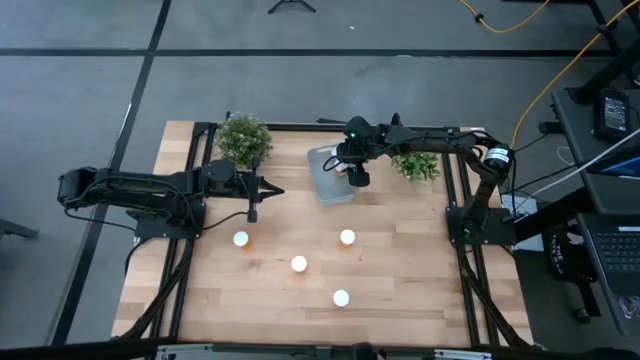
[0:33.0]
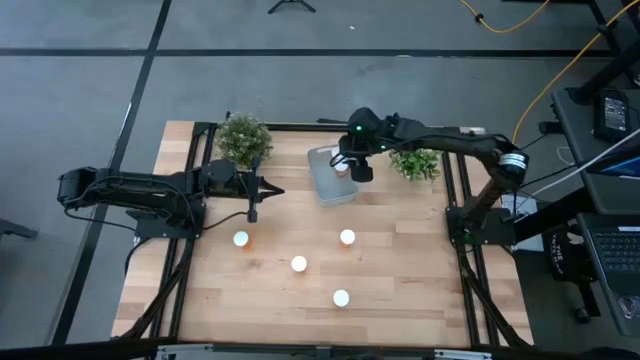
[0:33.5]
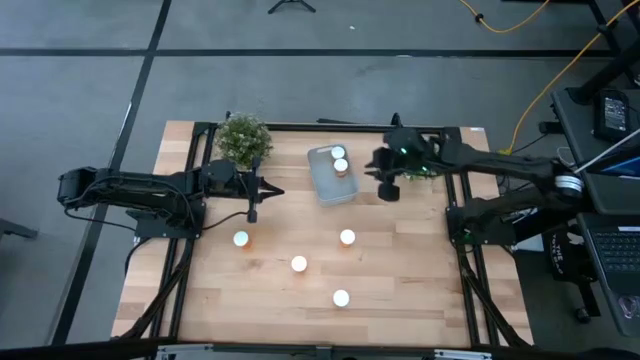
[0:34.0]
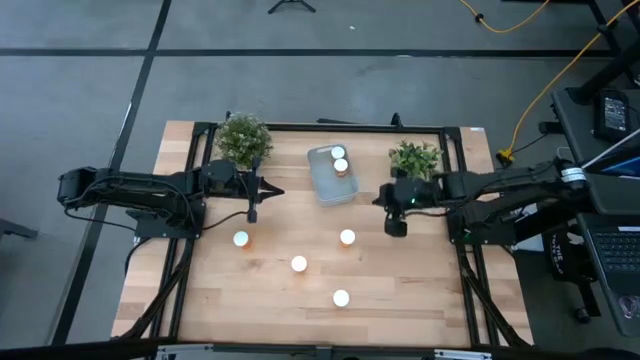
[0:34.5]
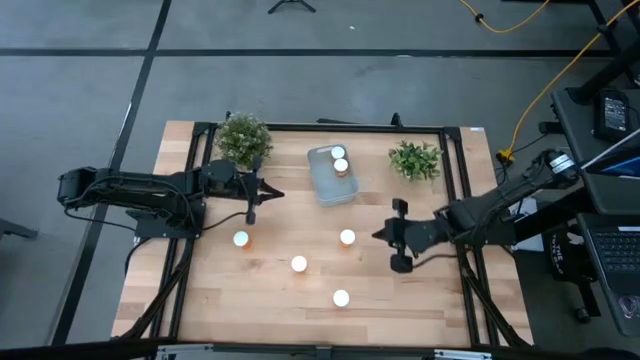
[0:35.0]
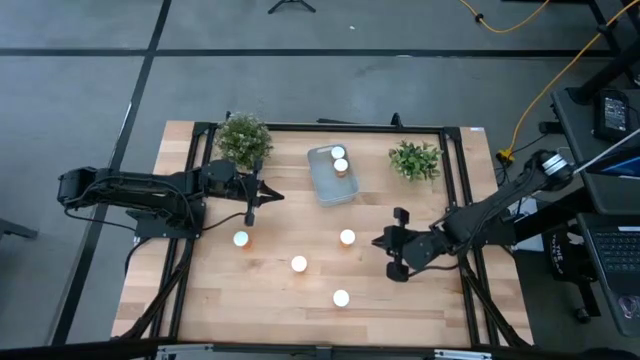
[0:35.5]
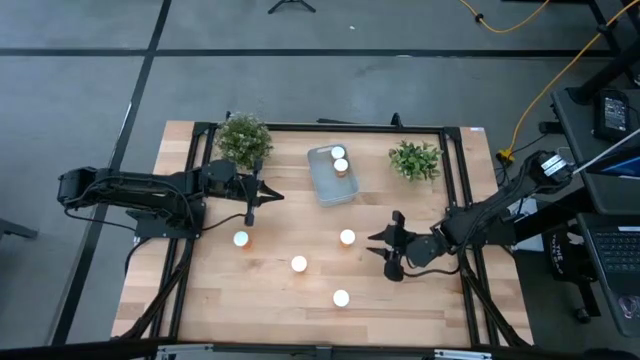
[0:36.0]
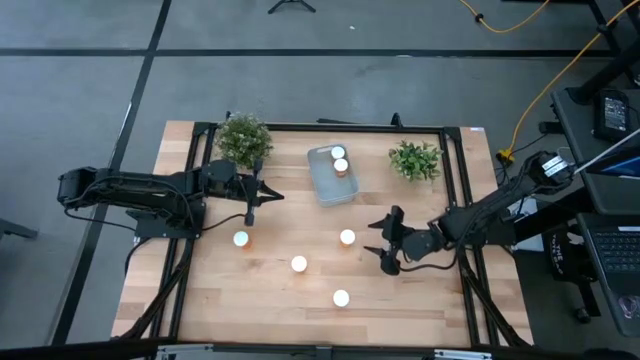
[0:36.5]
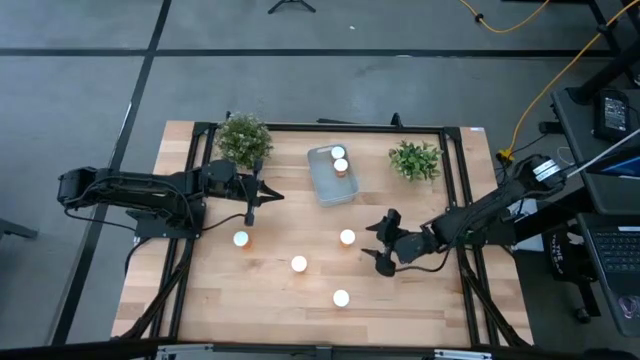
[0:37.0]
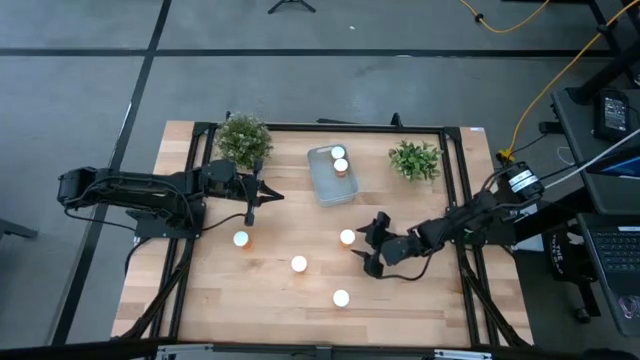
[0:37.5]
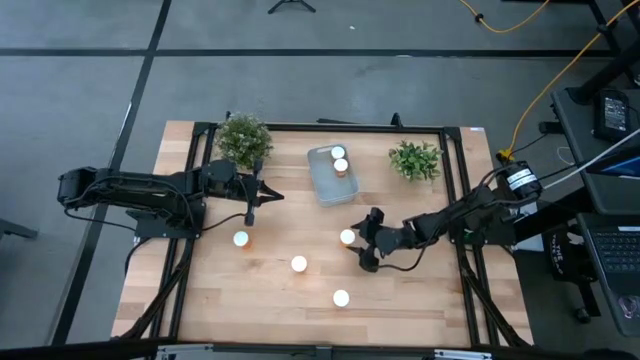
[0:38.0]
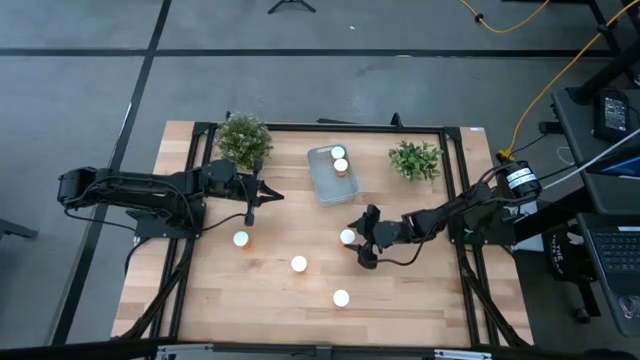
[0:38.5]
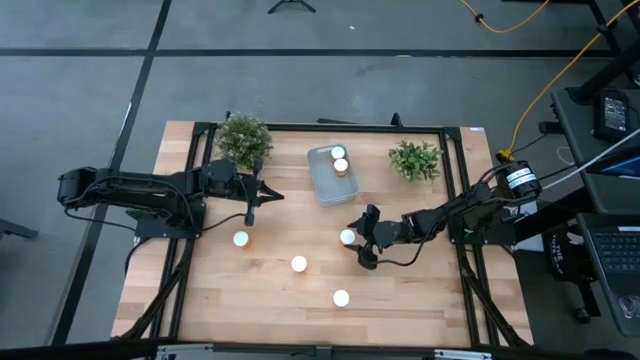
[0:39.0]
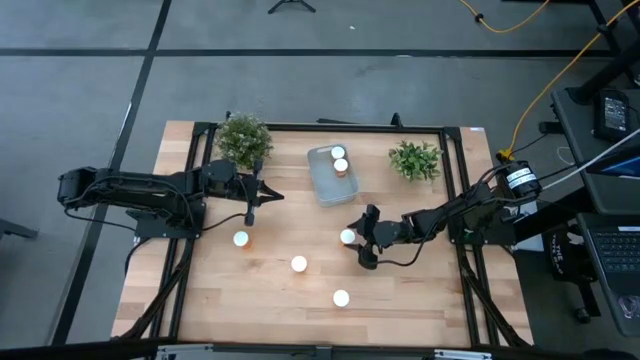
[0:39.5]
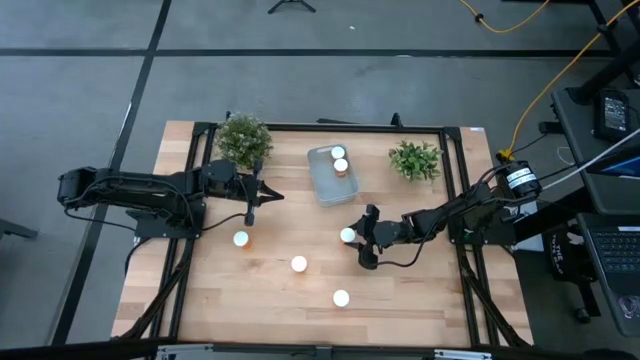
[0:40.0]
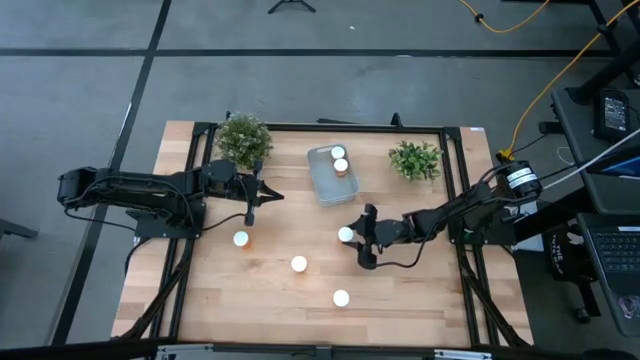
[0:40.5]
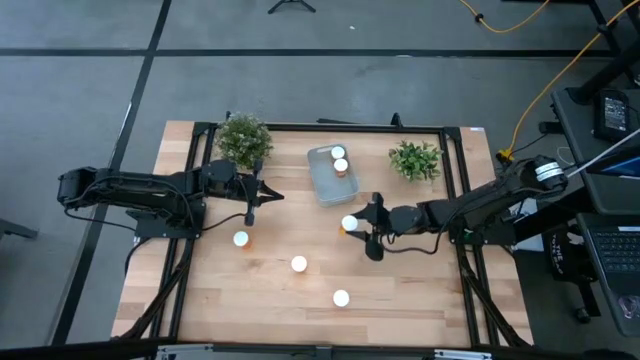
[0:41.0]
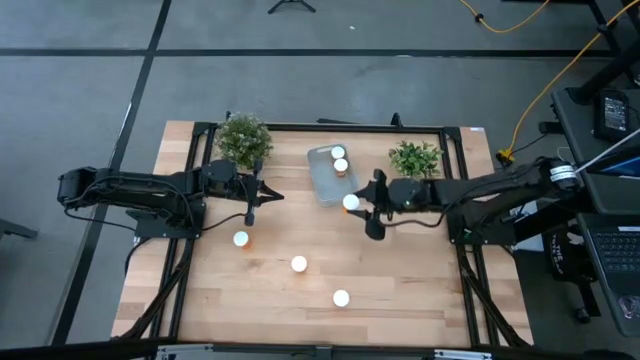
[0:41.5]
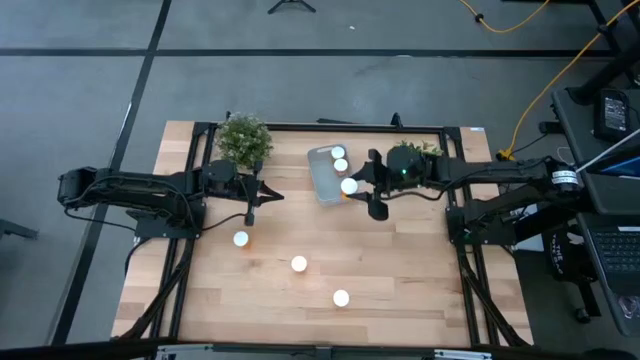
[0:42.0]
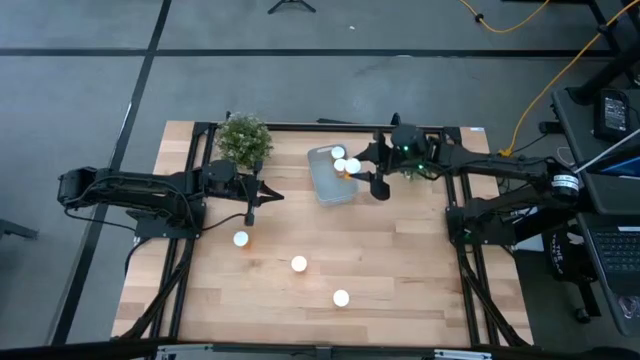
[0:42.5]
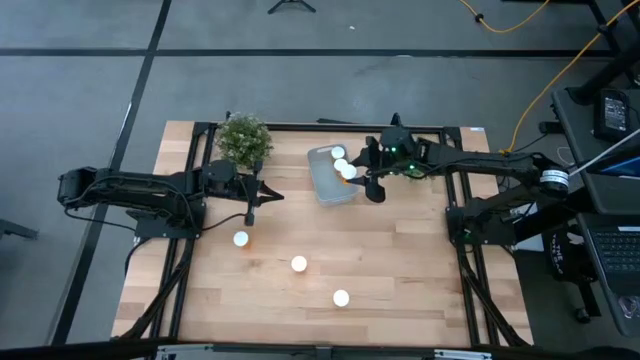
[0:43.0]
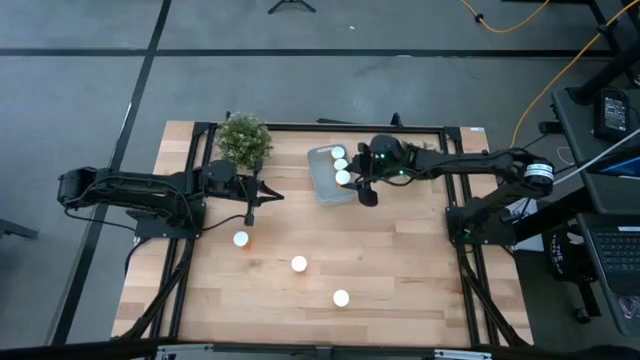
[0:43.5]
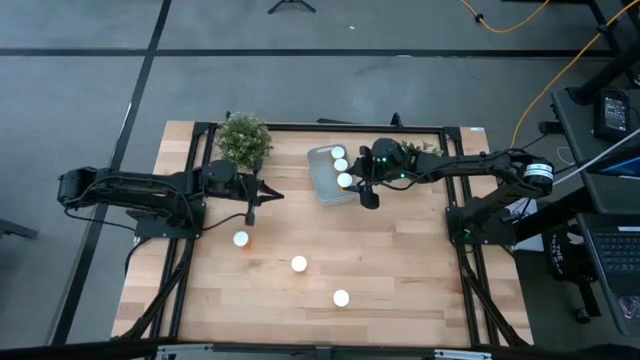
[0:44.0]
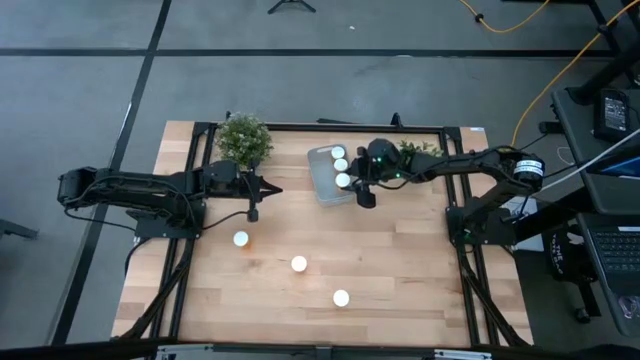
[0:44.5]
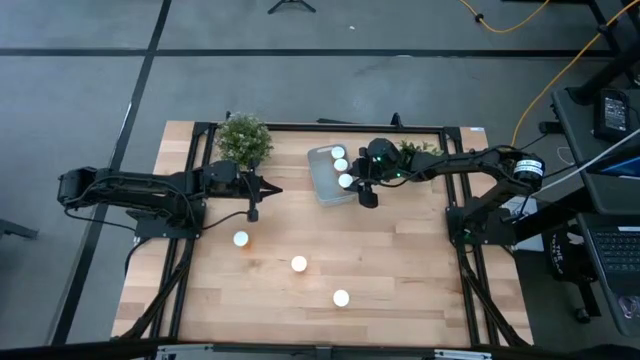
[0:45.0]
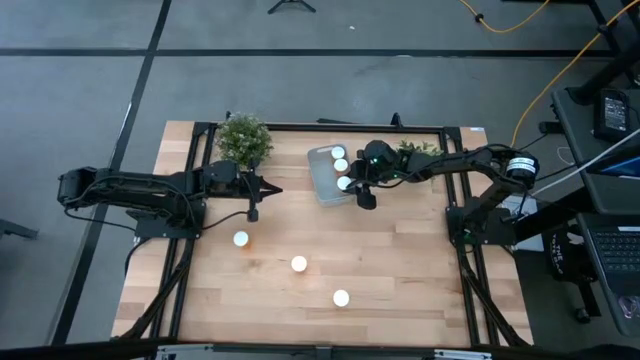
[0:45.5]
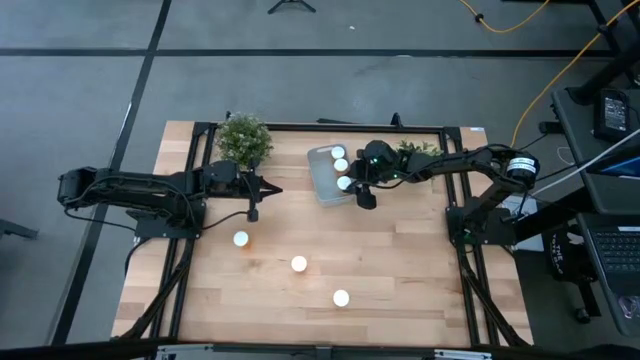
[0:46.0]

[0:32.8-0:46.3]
Task: Pick and place pill bottles into a basket
Put the orange pill bottle into the gray bin

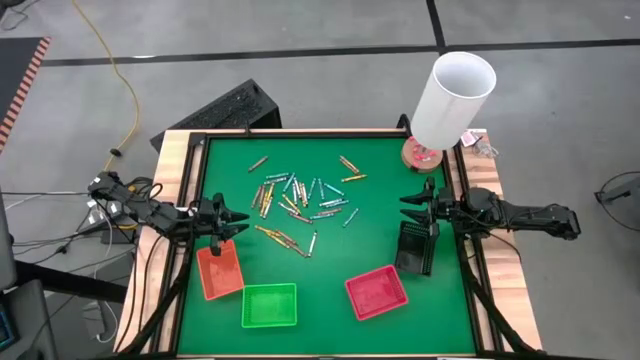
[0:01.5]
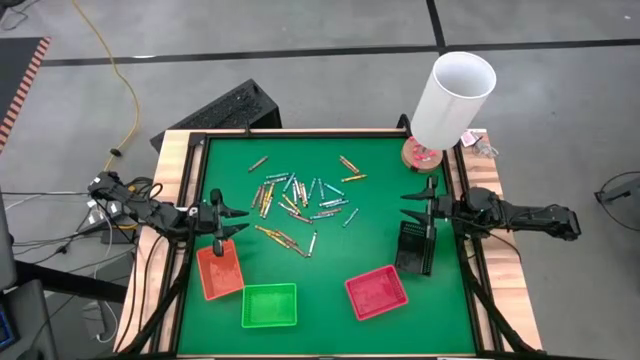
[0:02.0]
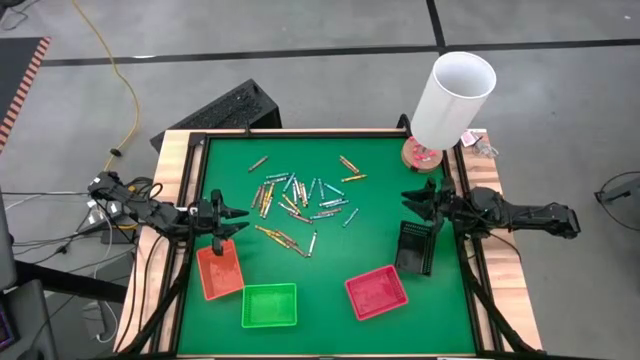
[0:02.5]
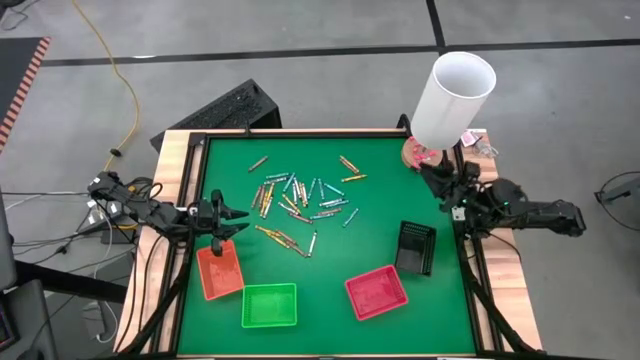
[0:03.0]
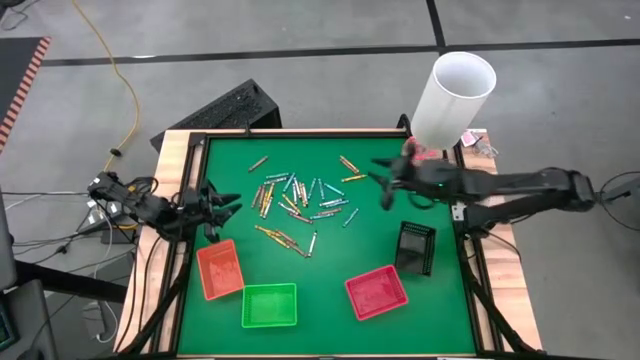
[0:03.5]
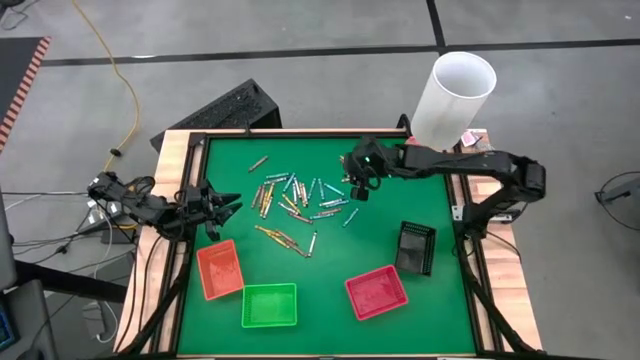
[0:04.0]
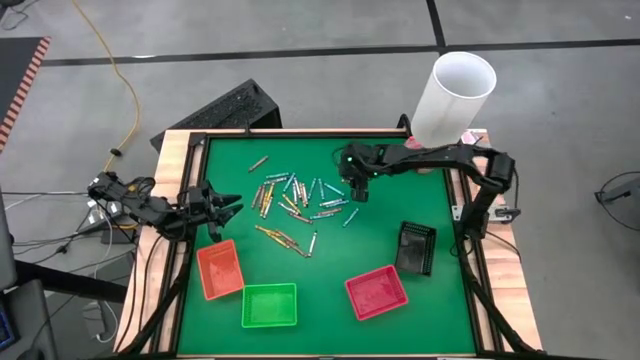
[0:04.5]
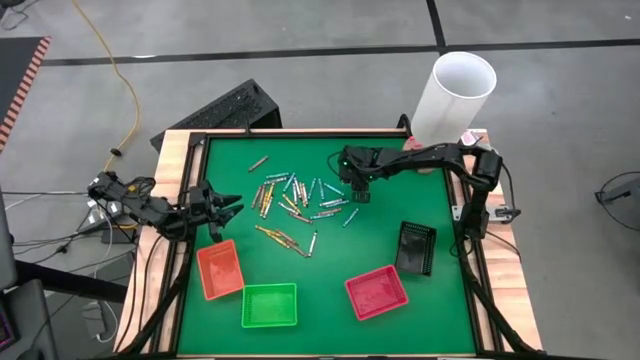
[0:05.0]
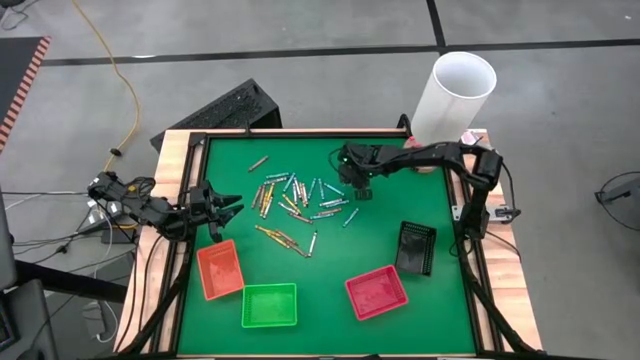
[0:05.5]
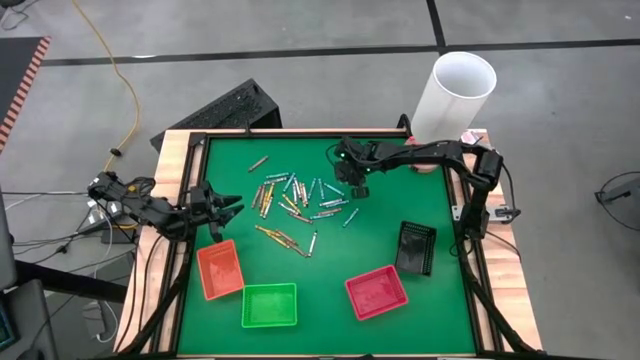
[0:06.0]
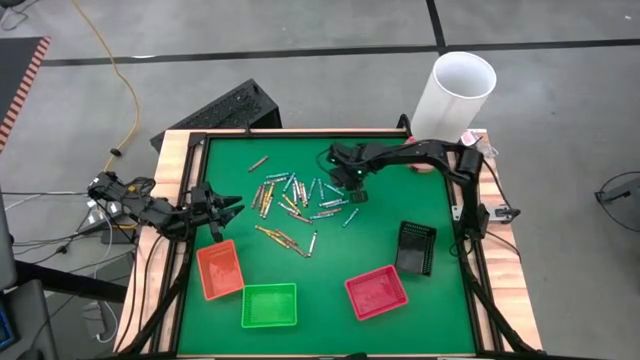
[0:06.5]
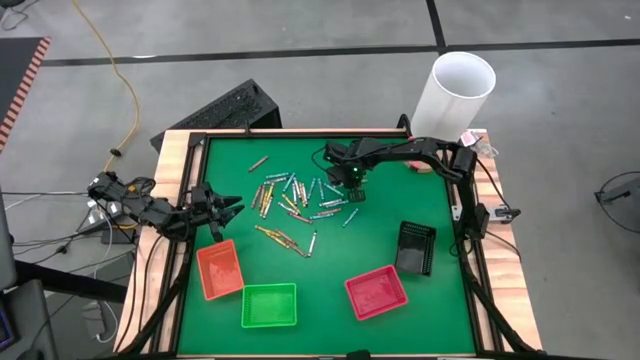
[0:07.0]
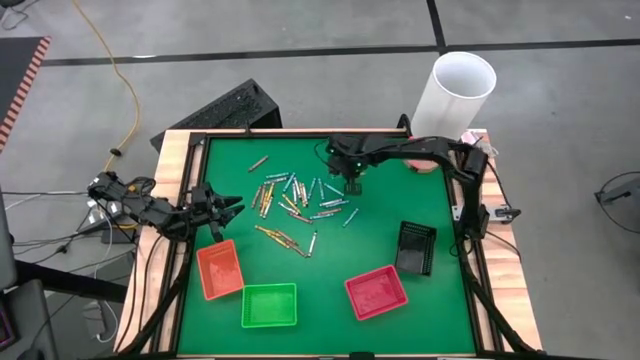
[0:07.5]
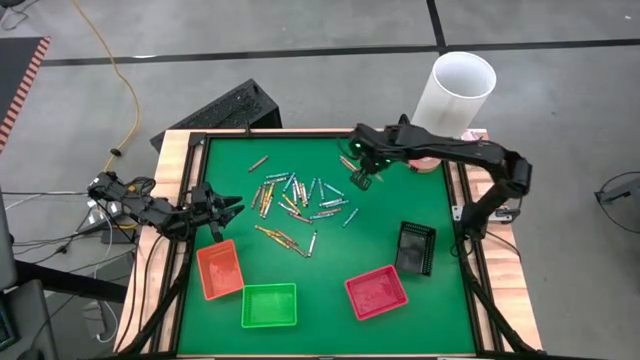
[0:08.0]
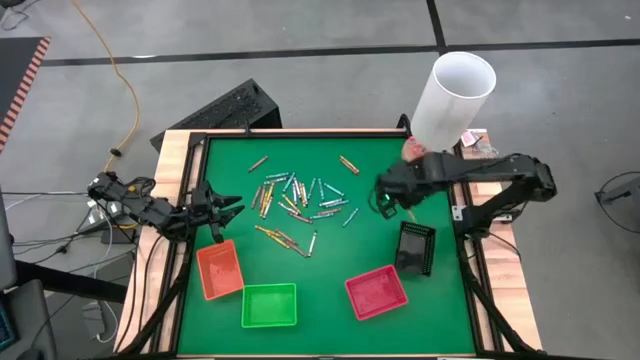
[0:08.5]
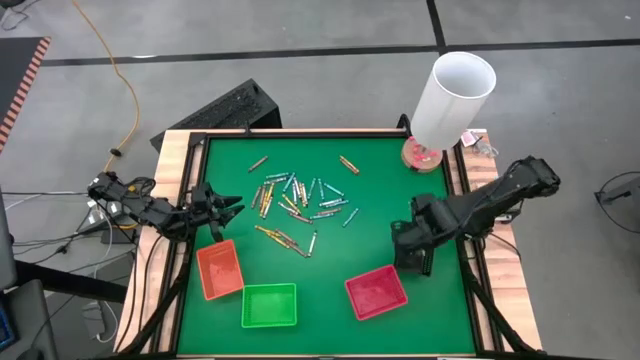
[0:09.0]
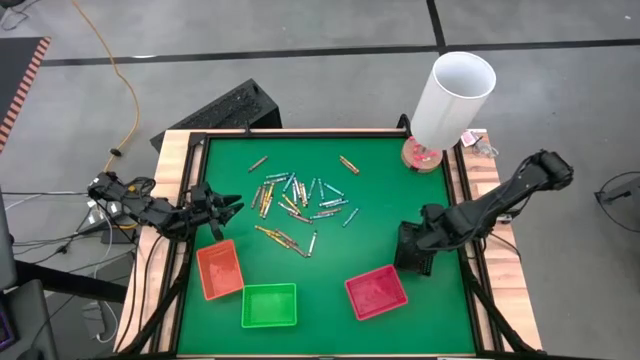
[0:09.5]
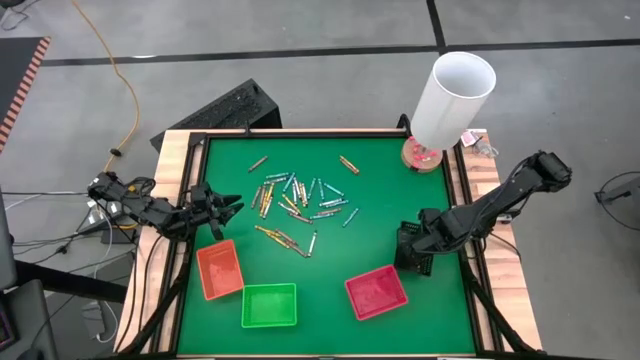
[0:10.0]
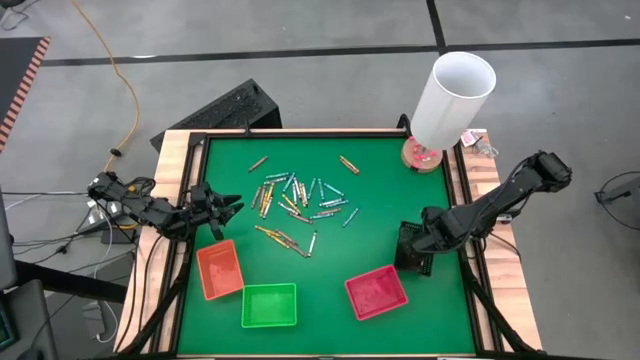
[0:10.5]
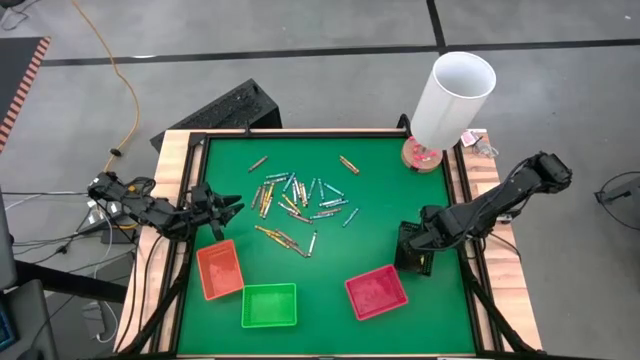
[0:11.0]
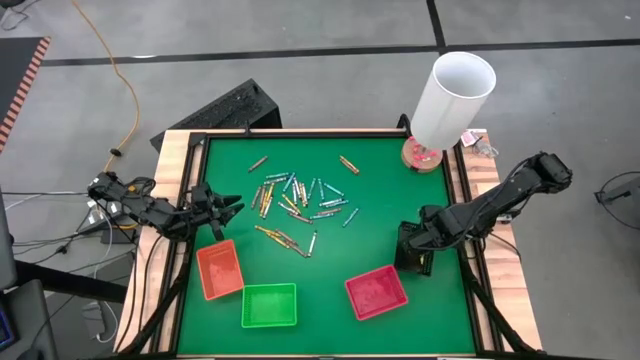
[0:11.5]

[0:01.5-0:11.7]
Task: Sort crayons
Put the yellow crayon into the green bin
